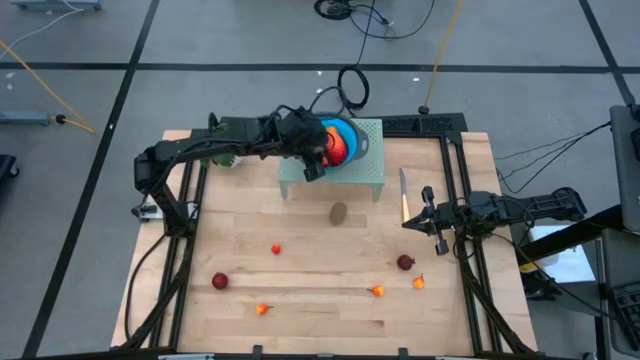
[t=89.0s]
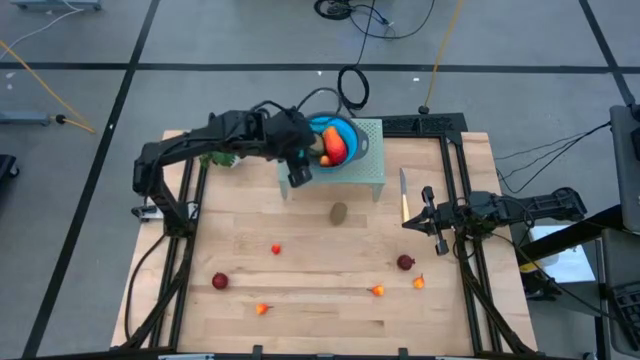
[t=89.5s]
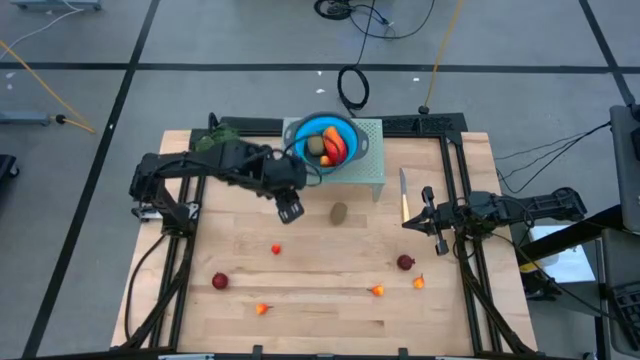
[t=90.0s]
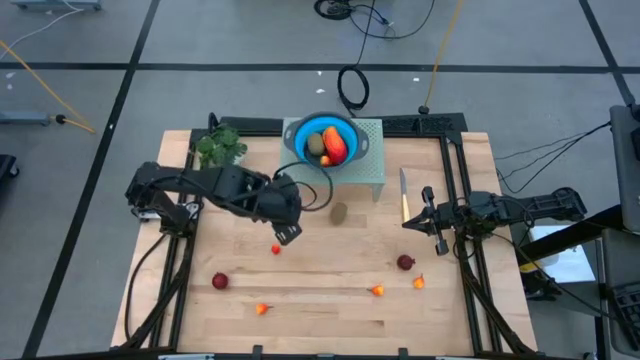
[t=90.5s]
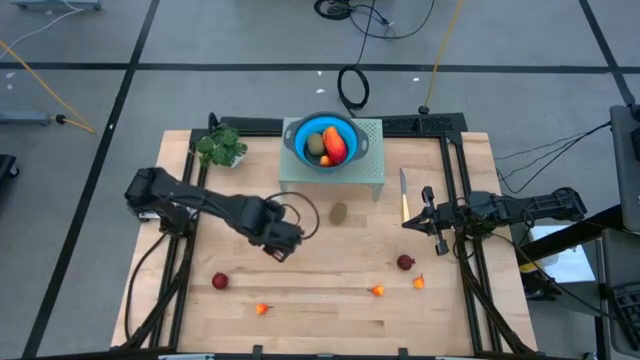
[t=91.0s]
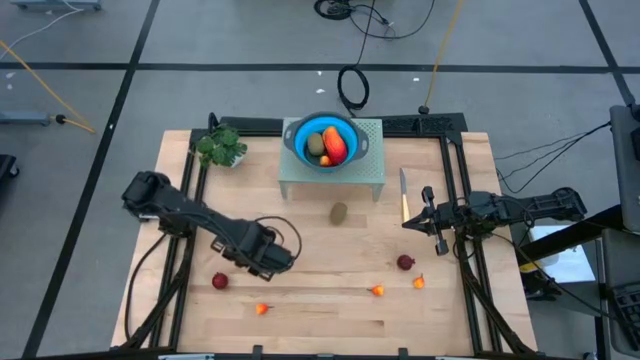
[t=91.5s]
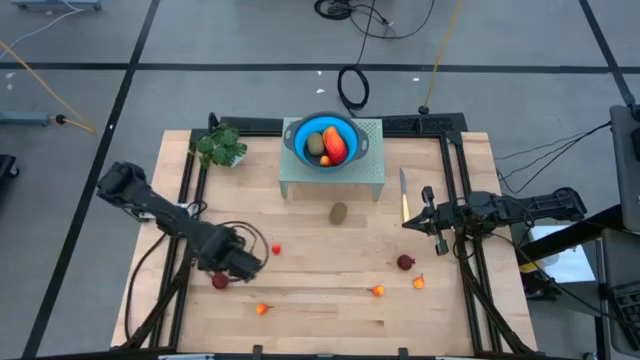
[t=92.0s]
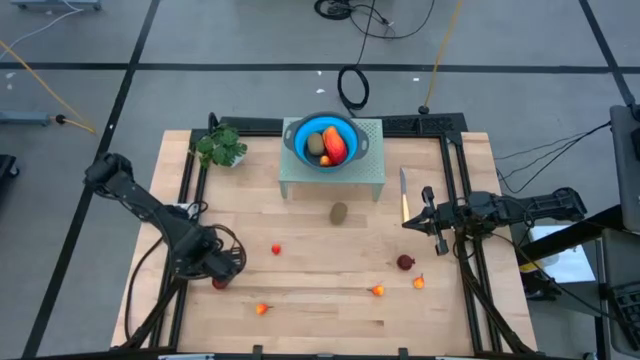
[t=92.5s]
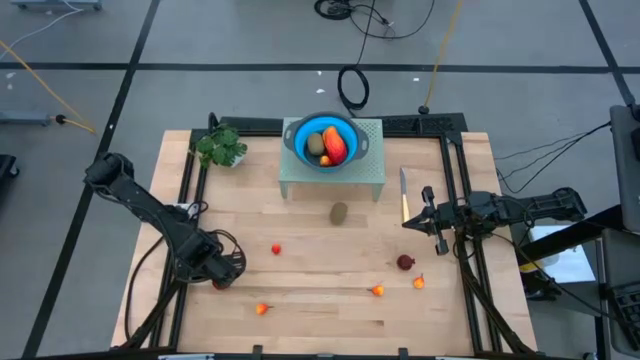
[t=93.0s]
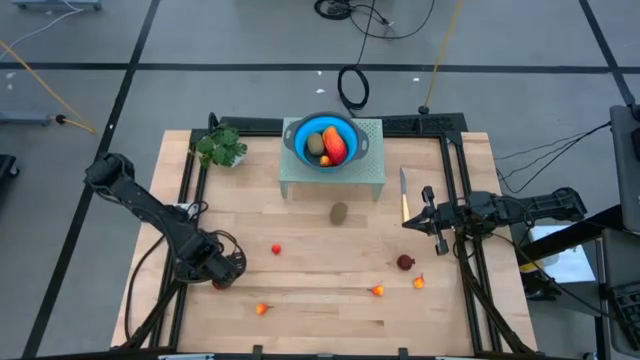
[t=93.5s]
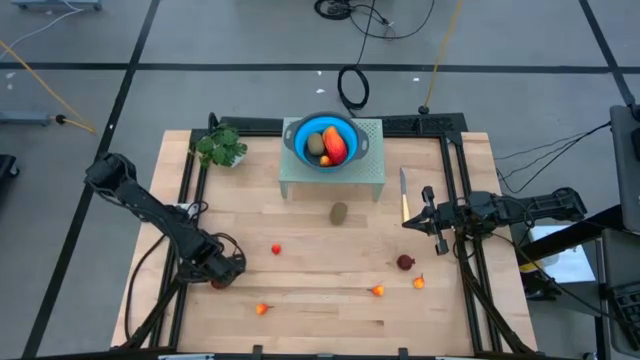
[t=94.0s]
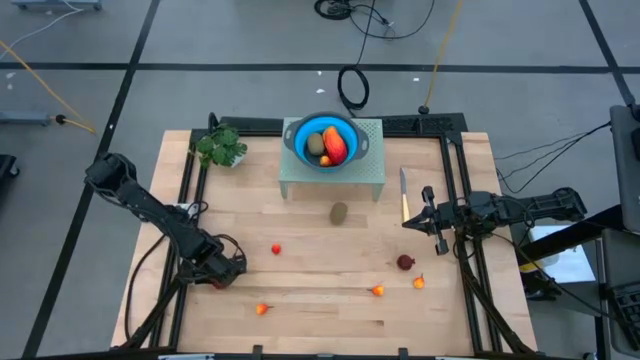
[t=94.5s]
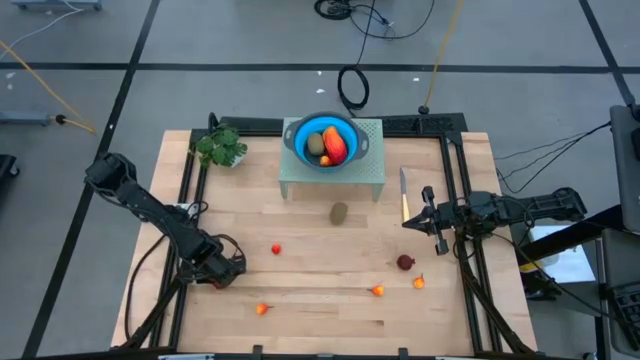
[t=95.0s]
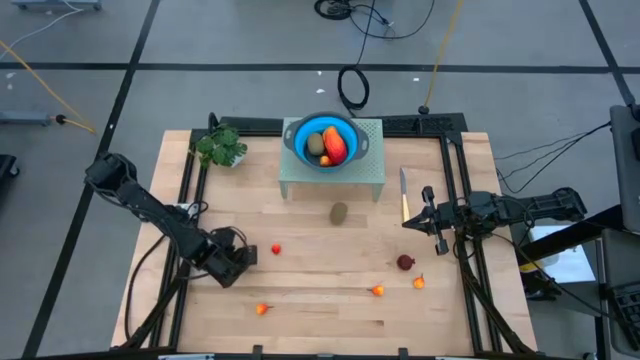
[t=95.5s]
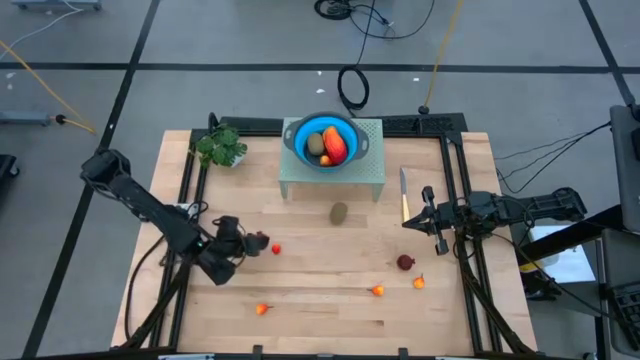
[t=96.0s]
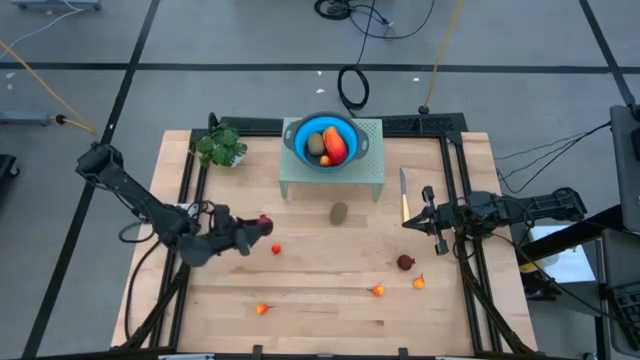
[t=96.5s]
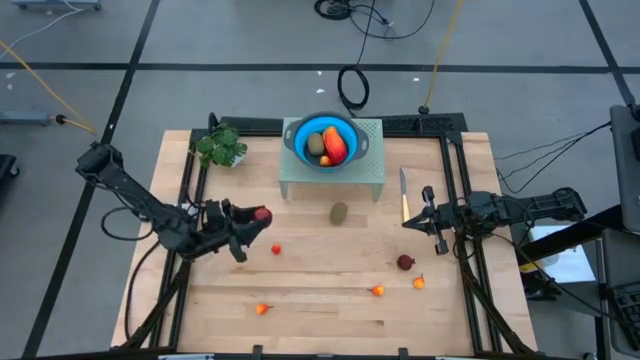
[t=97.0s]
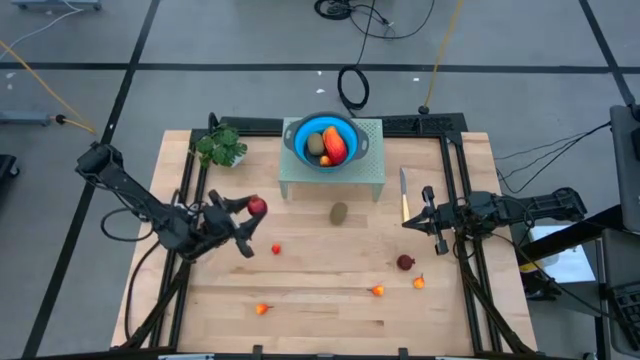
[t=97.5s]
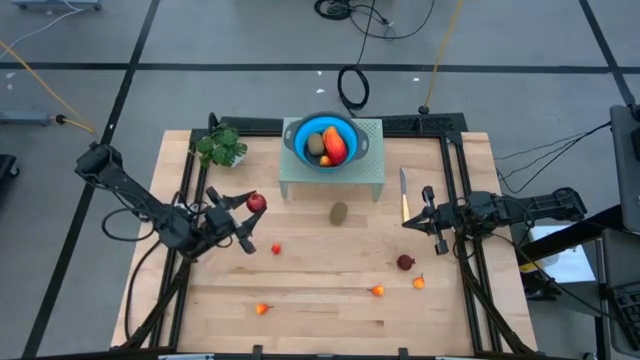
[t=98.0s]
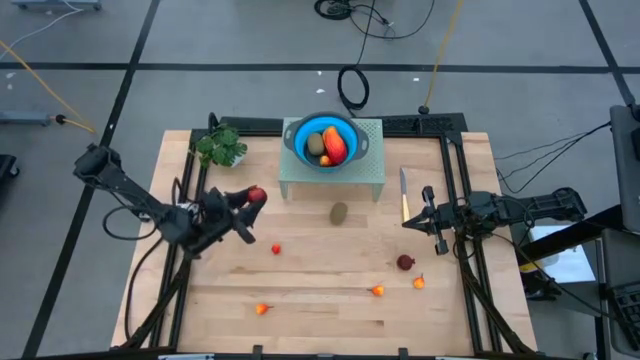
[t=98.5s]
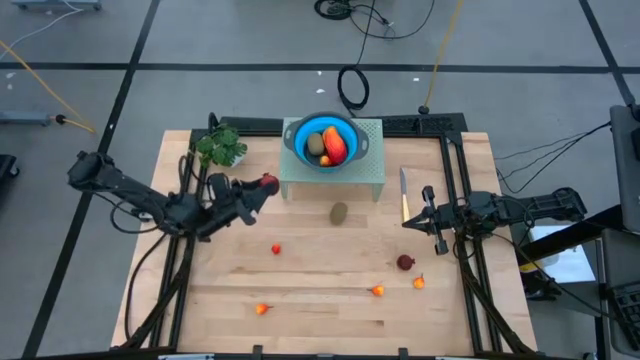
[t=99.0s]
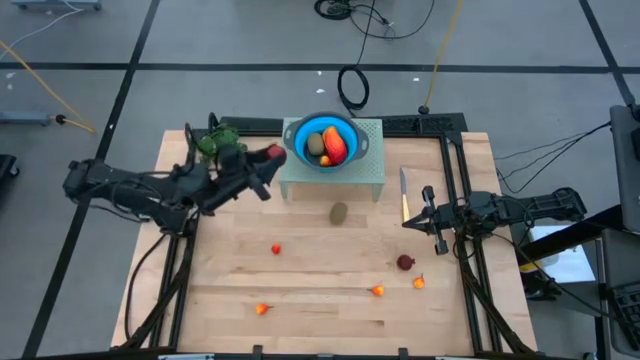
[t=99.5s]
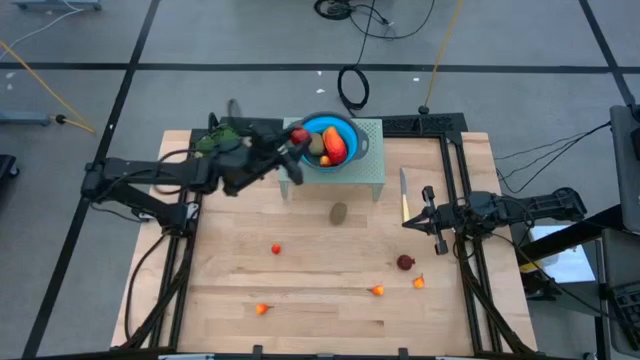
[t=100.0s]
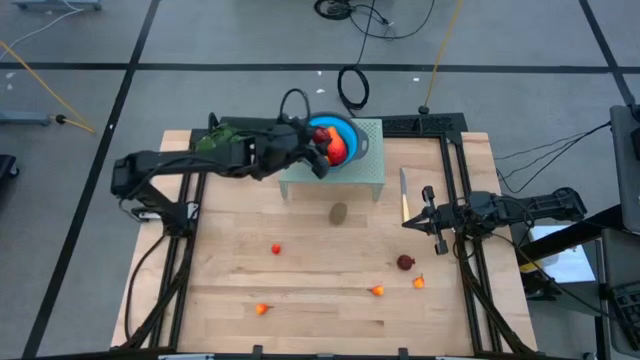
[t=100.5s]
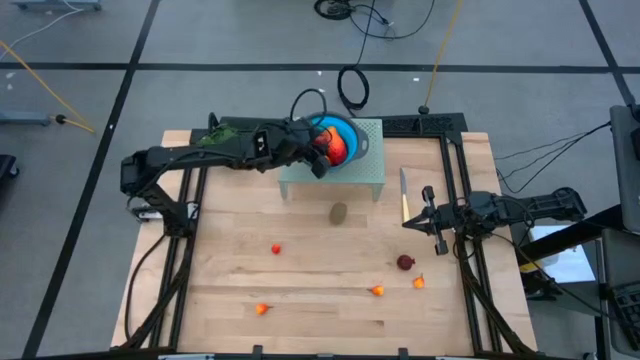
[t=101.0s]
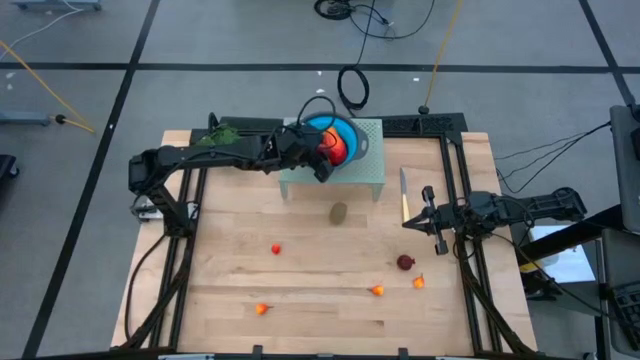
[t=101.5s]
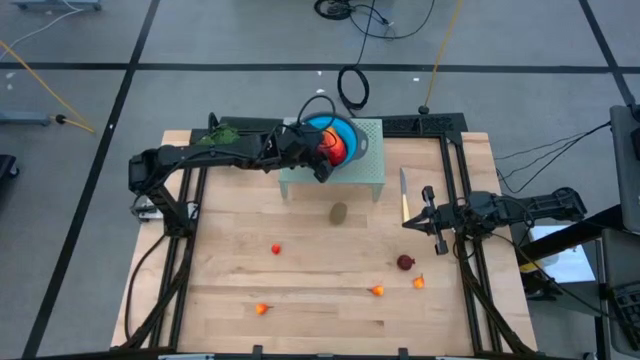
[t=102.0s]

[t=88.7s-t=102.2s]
Task: Pick & Place Fruit
Put the pomegranate into the colander on the shelf

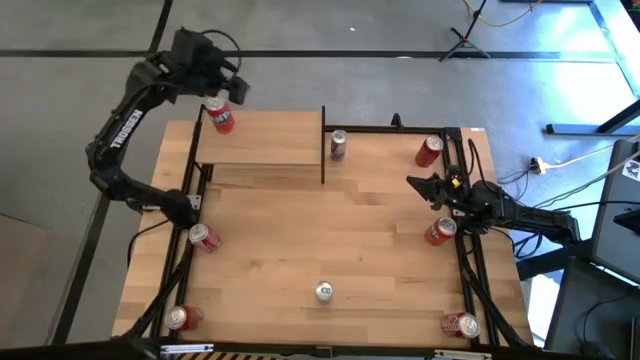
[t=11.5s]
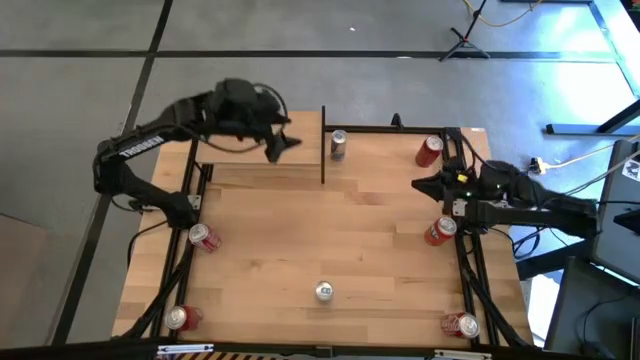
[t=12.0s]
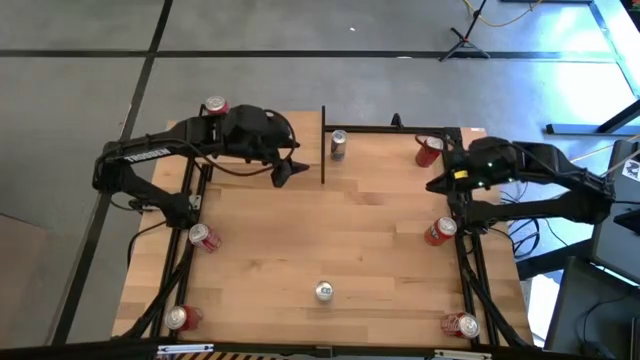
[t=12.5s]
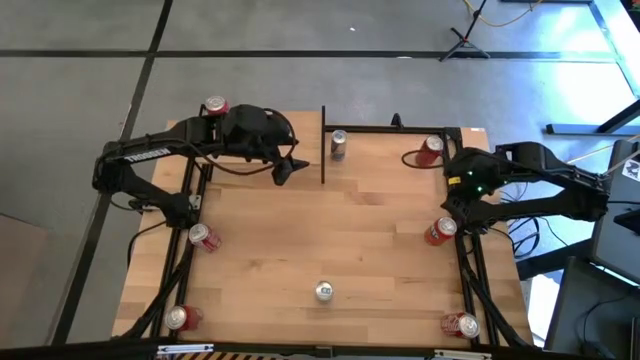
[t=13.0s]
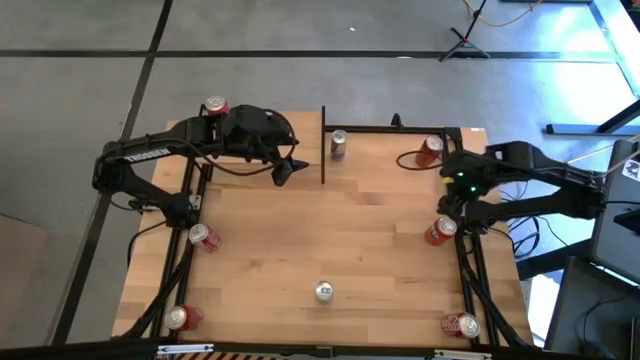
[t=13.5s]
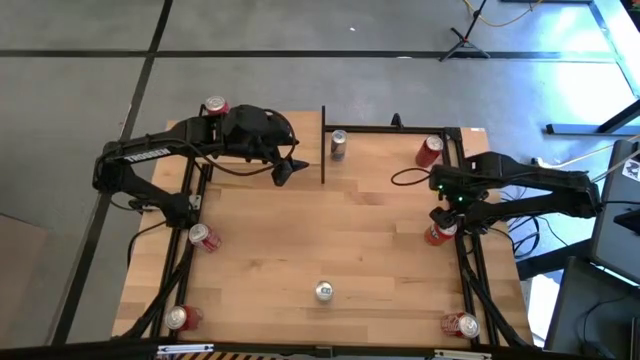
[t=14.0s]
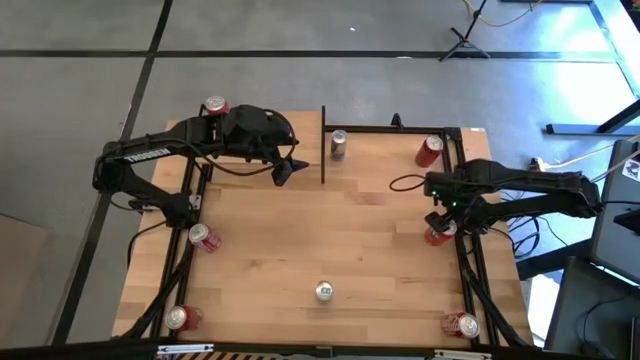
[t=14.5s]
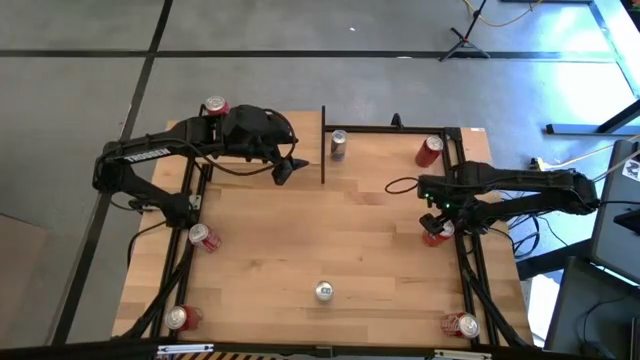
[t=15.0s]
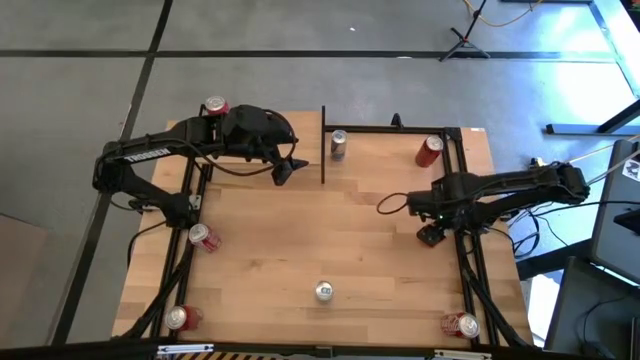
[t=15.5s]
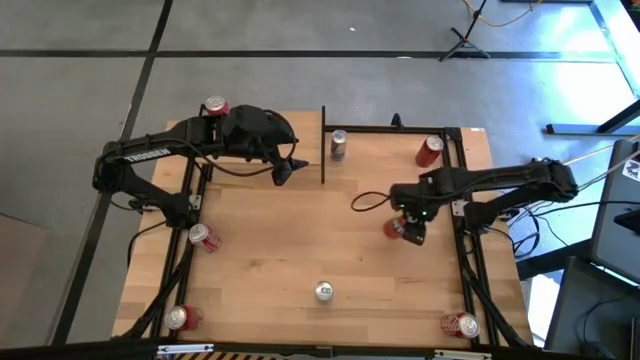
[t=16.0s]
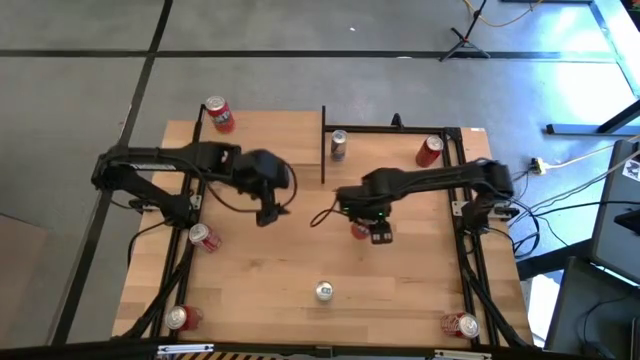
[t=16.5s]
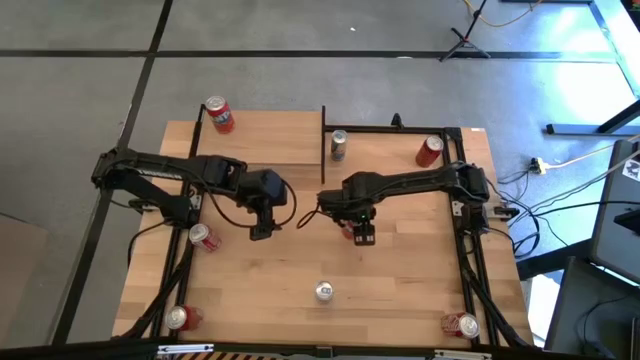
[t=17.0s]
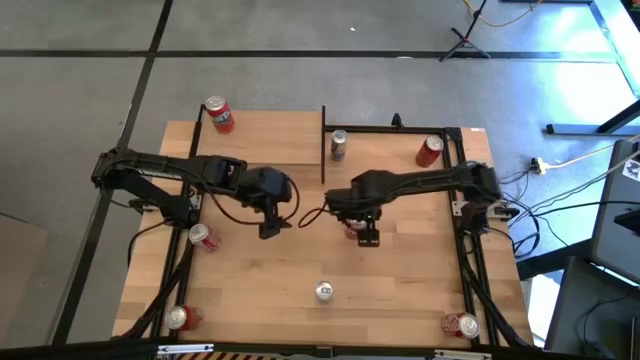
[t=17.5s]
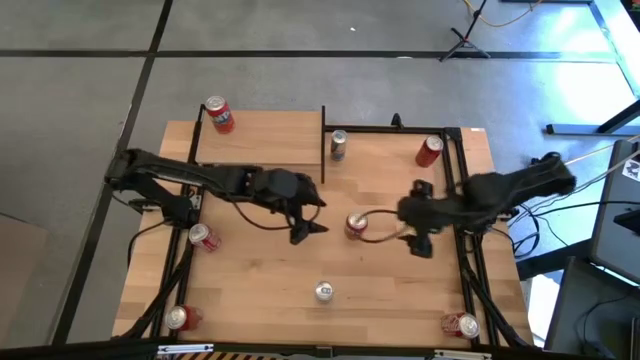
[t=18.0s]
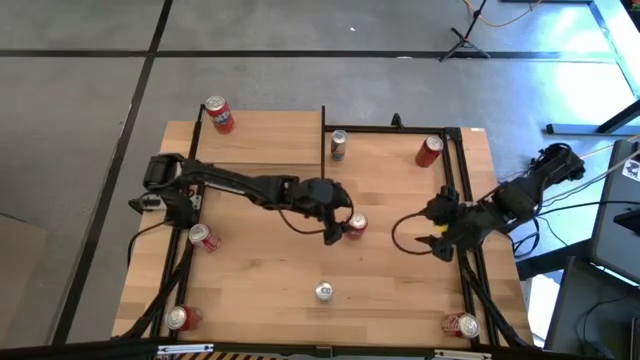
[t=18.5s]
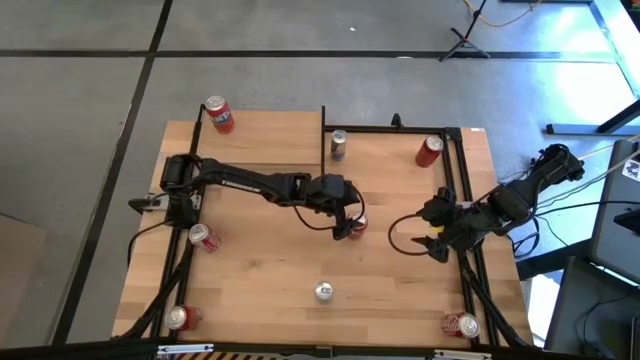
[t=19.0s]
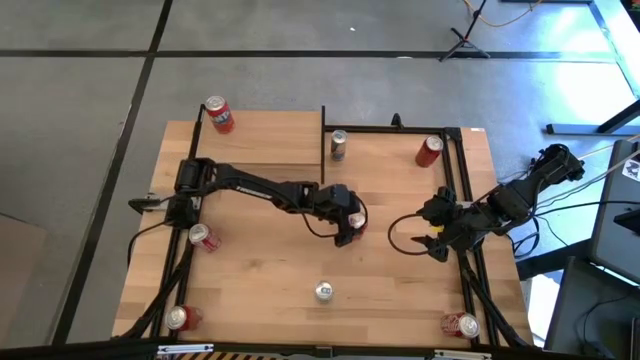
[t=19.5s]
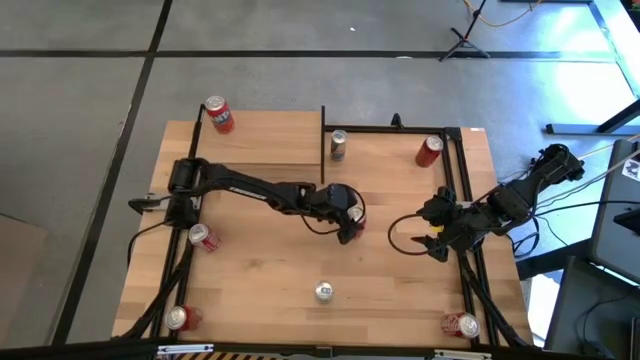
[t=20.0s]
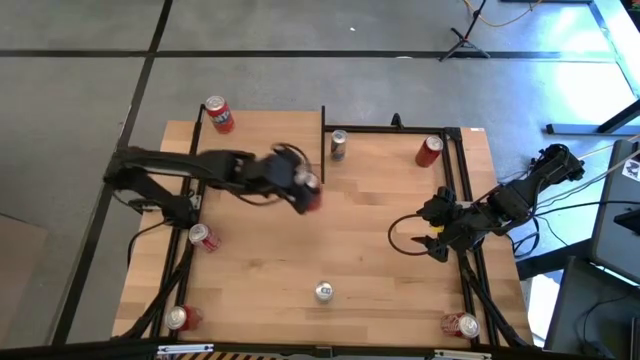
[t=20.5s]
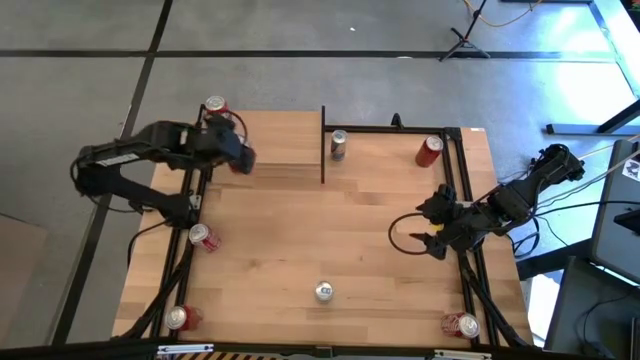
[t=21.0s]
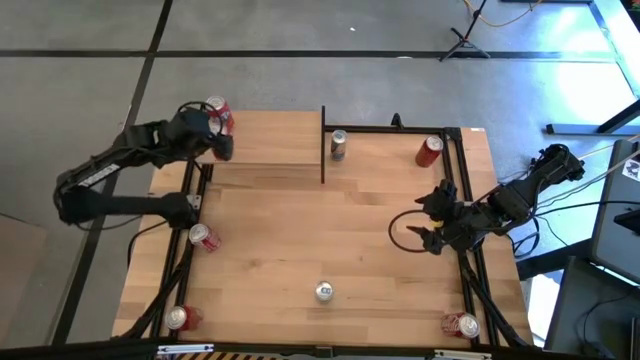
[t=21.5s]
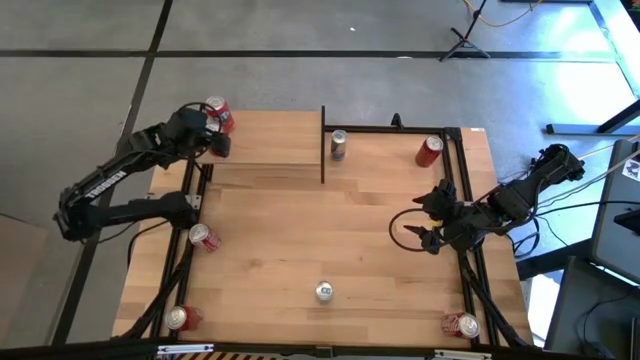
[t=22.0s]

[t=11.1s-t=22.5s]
Task: Place canned beverage on shelf
Put the red soda can on the shelf aligned with the other red soda can
